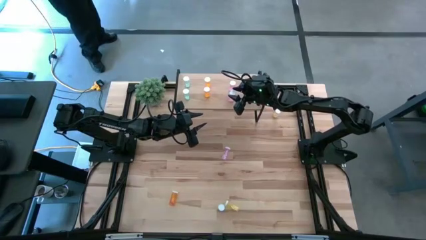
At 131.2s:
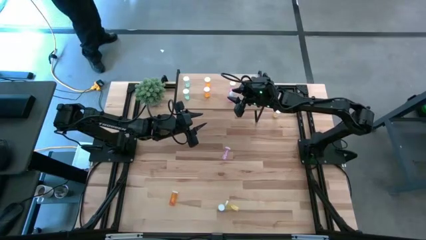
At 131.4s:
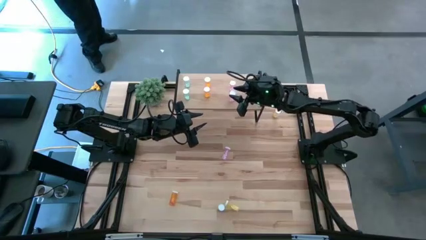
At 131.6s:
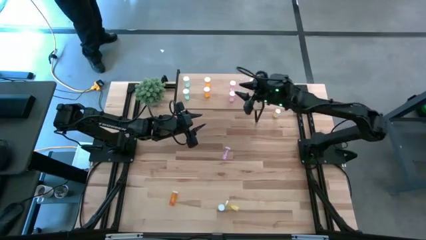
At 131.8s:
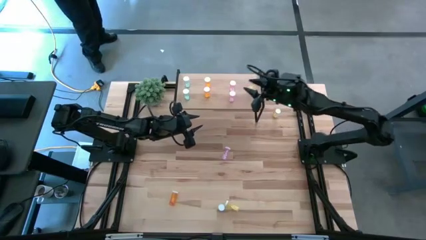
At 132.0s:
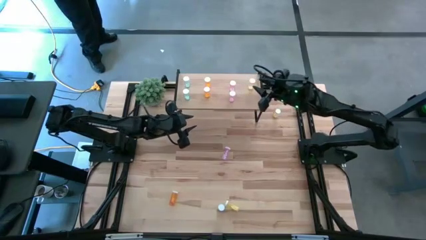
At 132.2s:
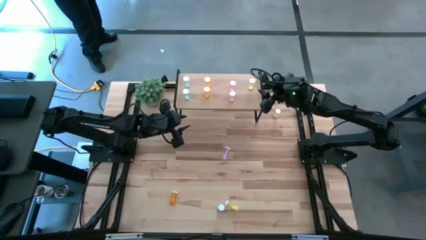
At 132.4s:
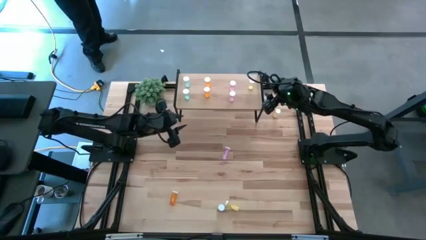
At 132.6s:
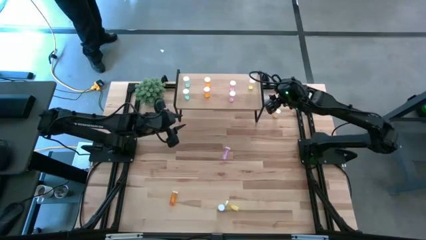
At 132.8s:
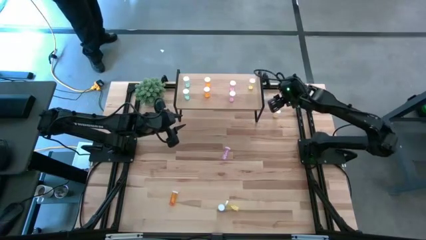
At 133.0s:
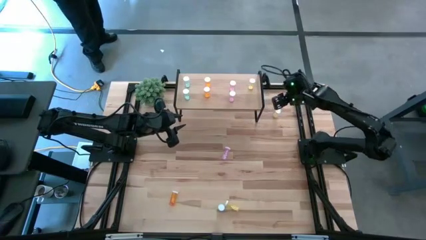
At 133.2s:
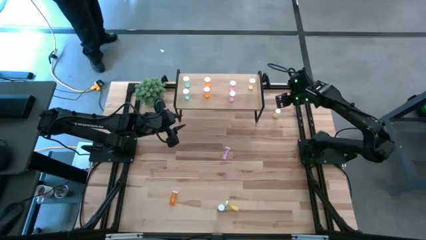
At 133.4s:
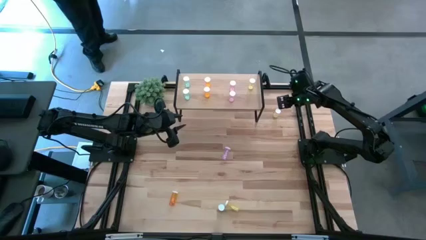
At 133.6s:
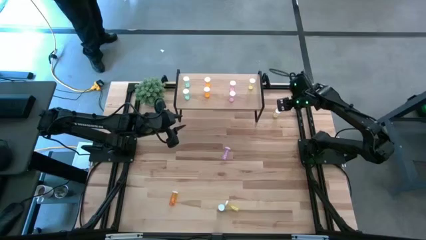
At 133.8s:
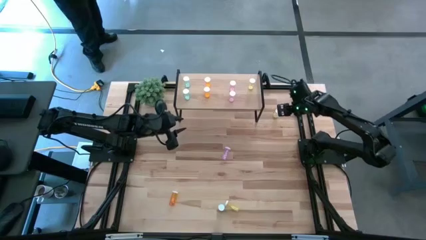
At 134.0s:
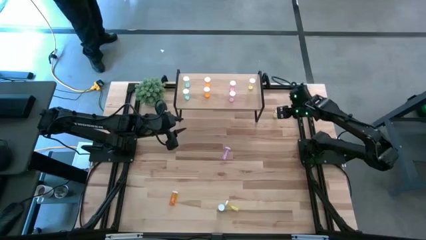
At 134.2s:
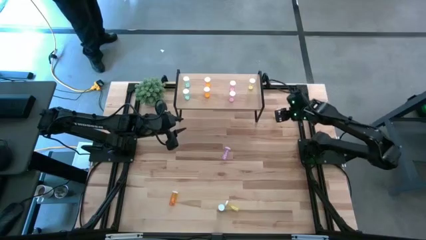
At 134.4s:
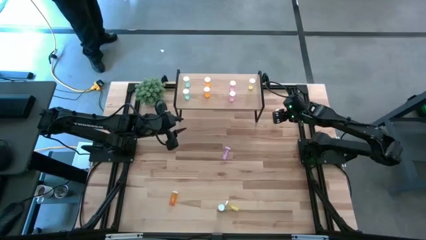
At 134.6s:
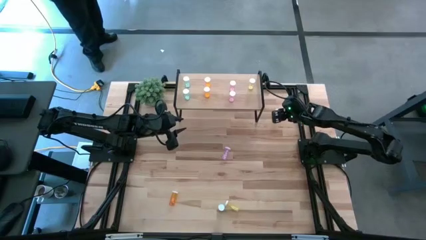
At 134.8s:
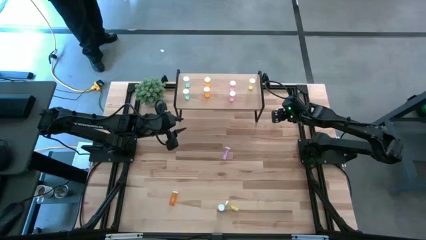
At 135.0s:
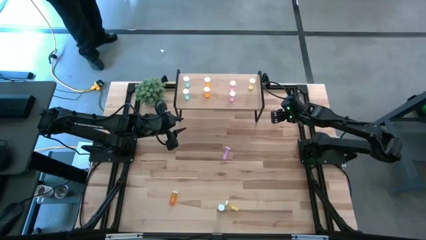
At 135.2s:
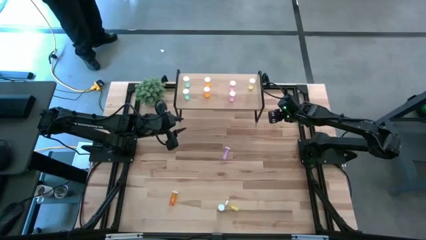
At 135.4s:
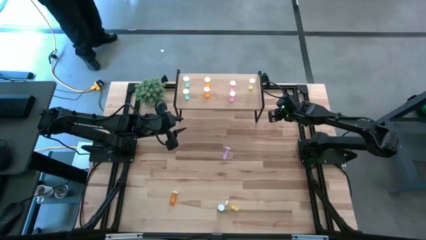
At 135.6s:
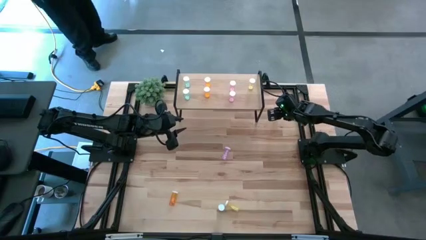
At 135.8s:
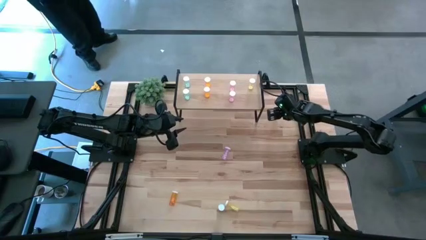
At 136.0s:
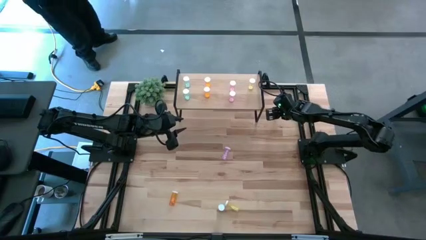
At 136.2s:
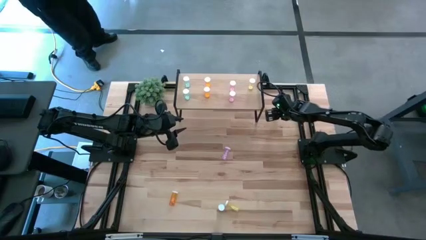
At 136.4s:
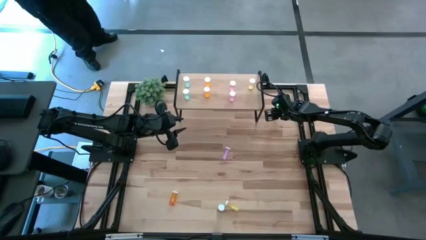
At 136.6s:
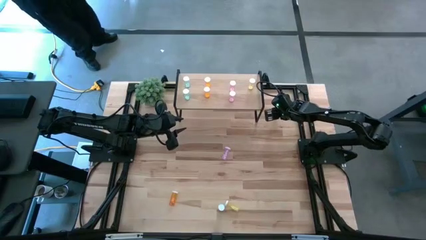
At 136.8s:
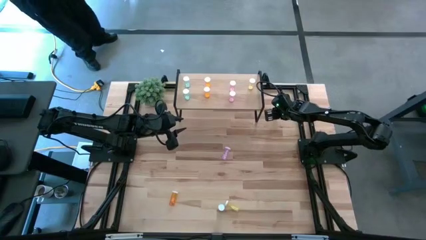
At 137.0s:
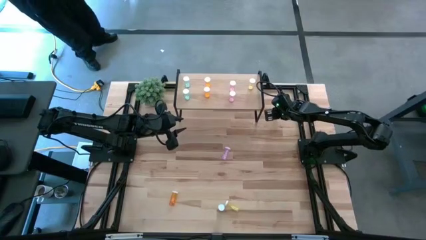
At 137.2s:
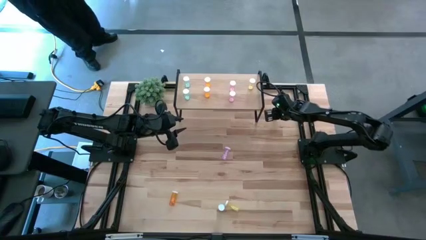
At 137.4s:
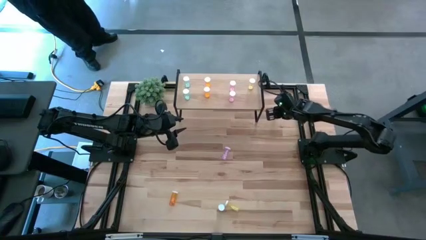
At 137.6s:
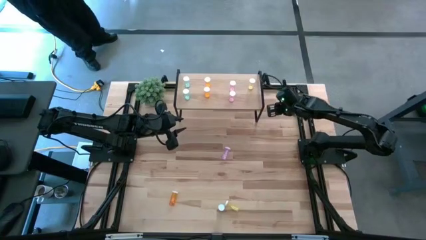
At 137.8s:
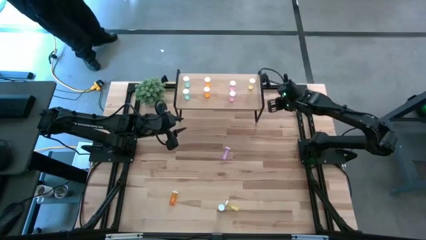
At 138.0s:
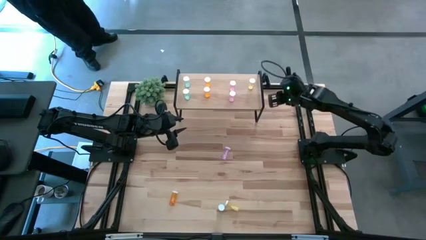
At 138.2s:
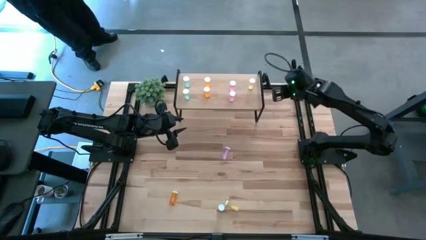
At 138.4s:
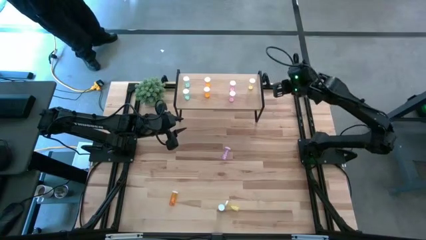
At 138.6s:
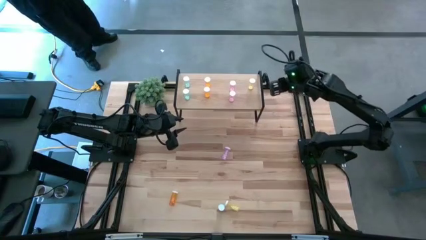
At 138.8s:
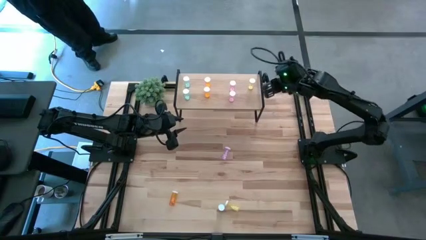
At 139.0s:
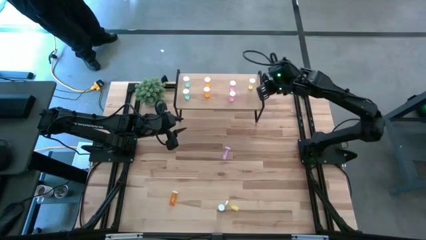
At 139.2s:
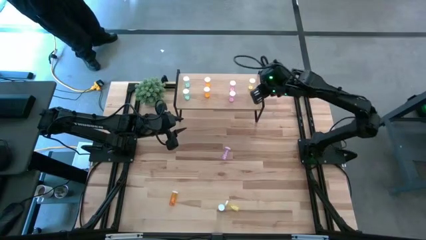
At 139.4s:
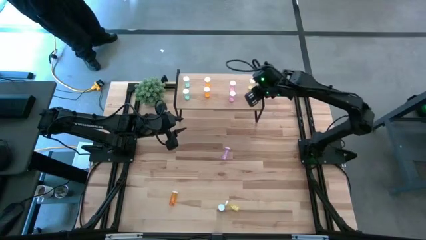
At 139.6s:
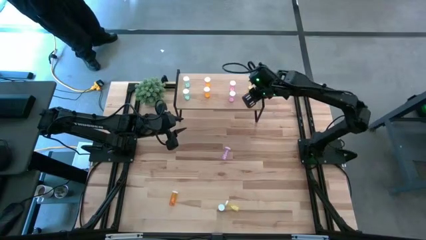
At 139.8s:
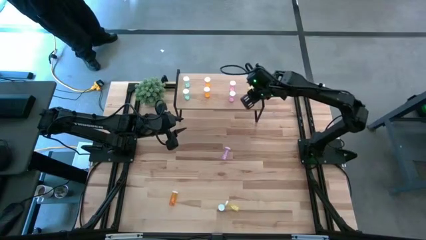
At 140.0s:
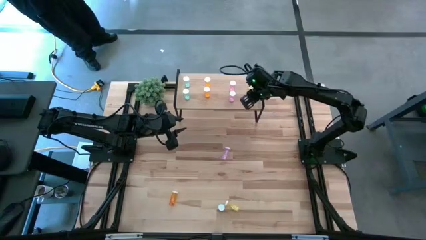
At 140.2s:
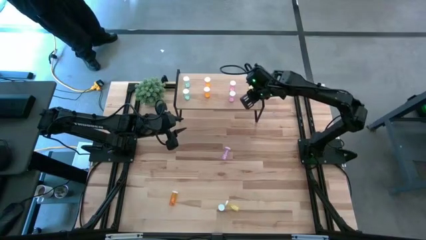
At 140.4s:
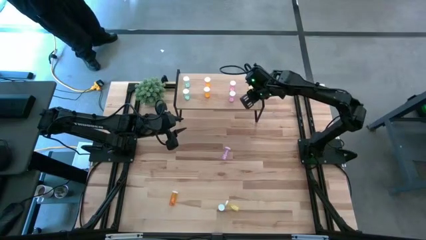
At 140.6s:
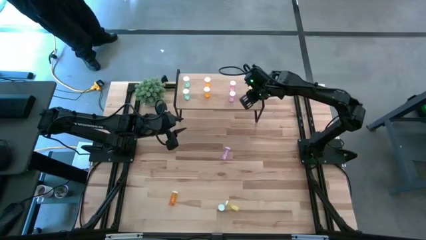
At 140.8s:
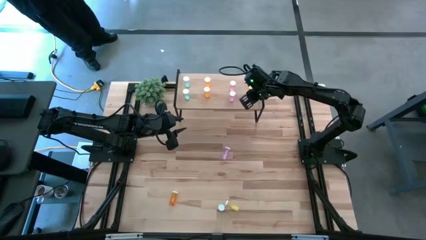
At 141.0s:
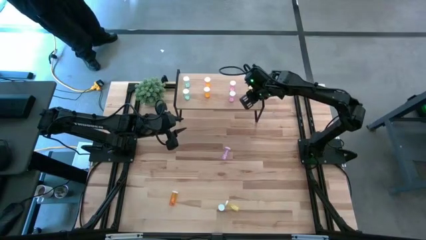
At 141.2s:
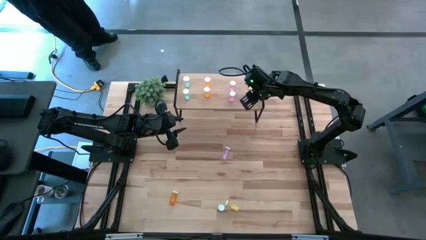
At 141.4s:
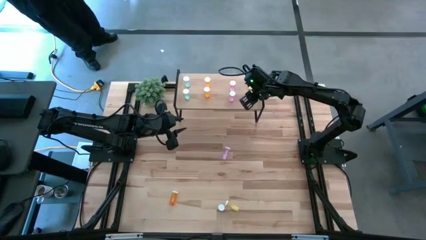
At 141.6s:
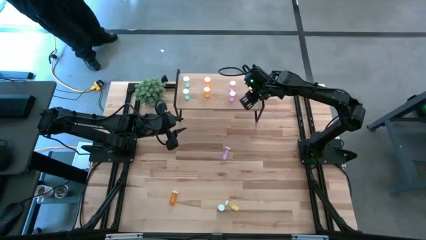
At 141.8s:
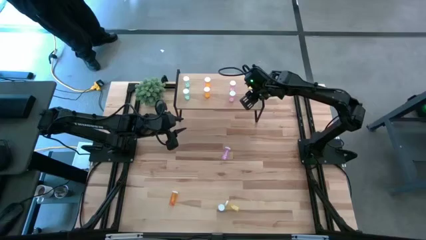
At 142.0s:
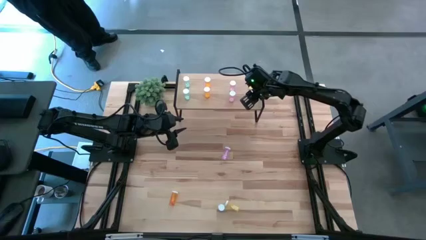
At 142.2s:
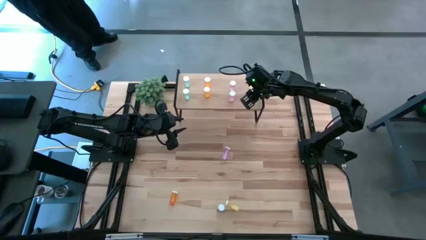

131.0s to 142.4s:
Task: Pick and place medicine bottles onto shelf by color
Put the top yellow pill bottle on the shelf aligned with the yellow pill bottle

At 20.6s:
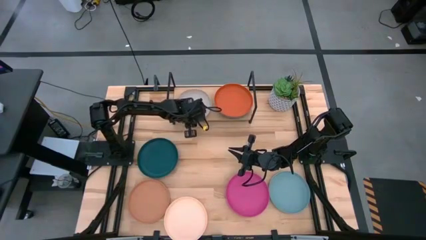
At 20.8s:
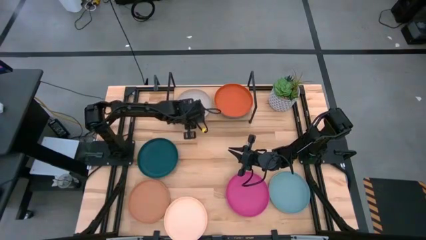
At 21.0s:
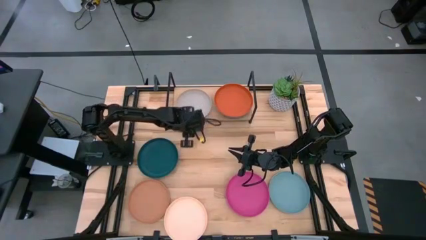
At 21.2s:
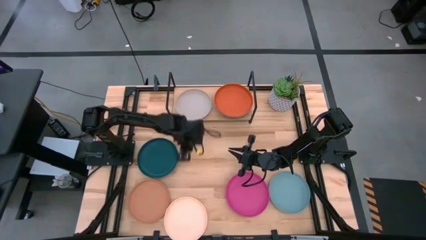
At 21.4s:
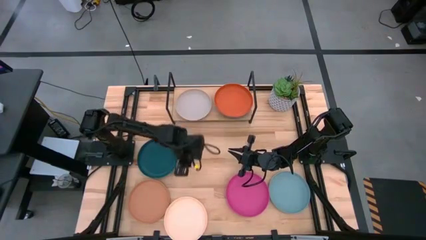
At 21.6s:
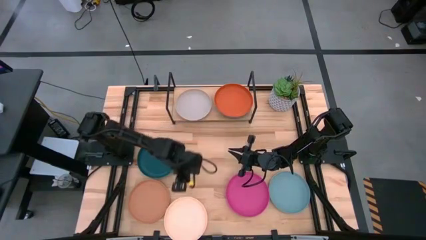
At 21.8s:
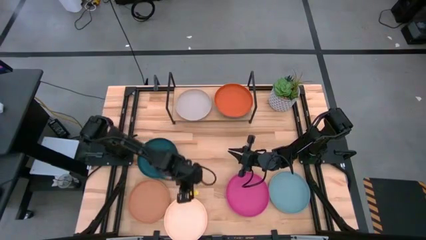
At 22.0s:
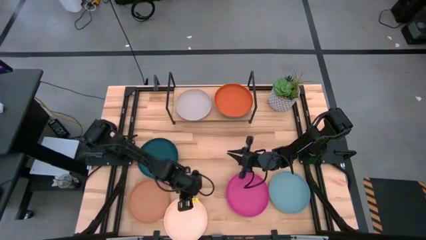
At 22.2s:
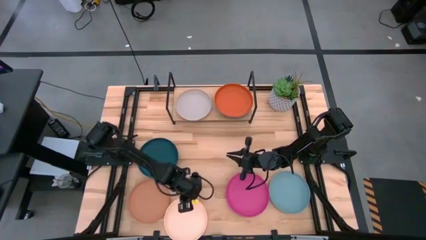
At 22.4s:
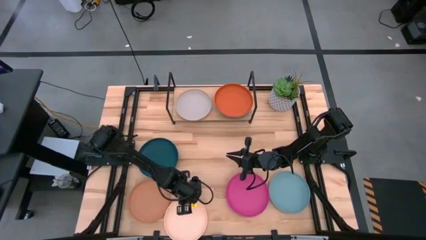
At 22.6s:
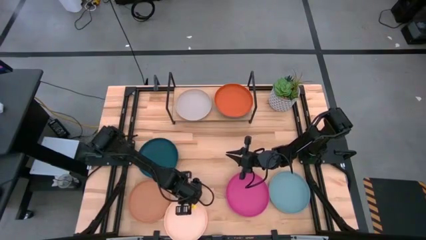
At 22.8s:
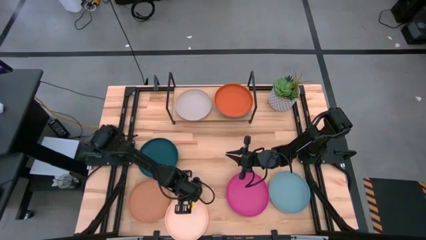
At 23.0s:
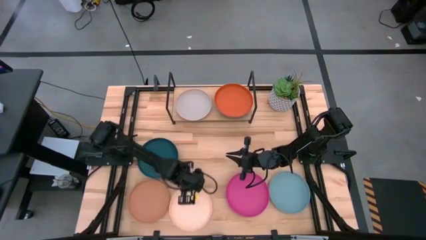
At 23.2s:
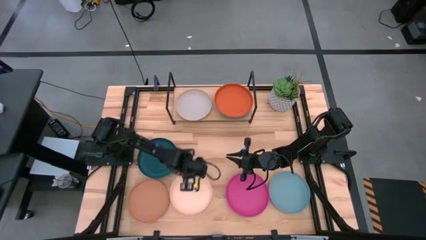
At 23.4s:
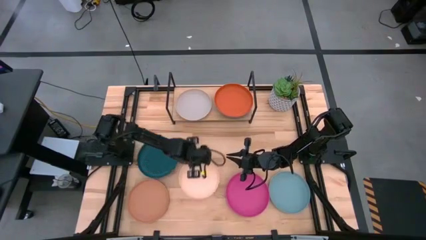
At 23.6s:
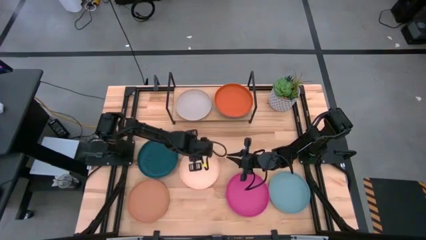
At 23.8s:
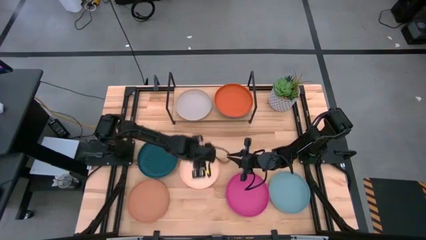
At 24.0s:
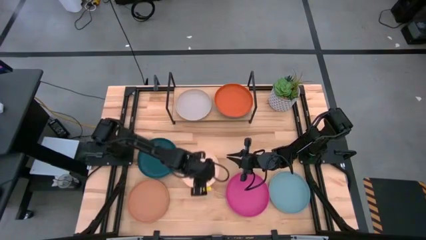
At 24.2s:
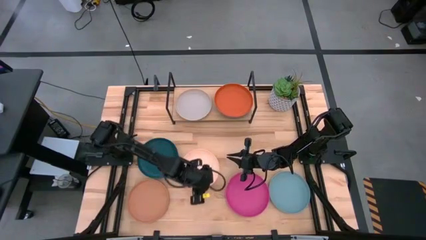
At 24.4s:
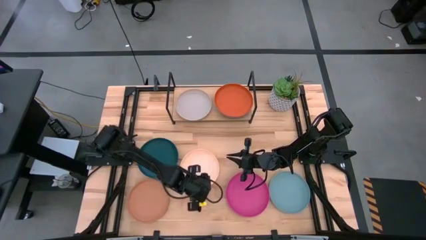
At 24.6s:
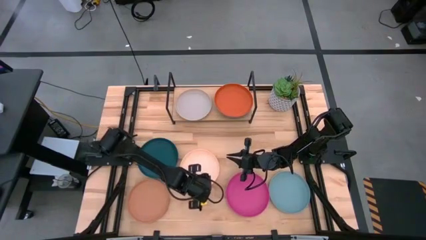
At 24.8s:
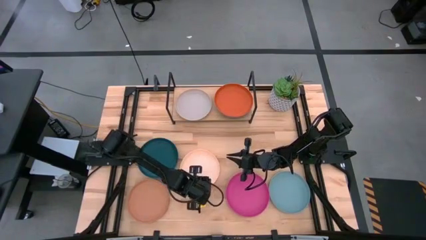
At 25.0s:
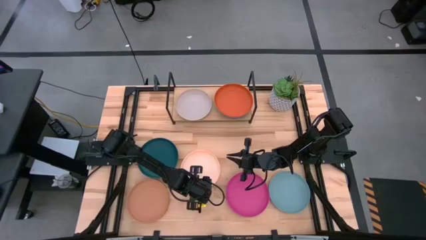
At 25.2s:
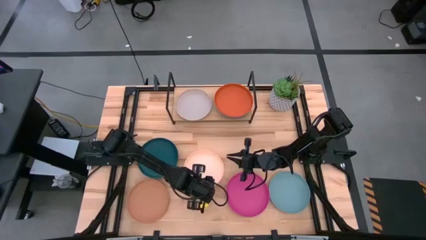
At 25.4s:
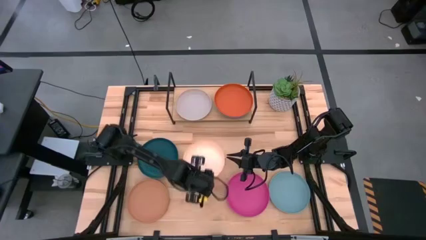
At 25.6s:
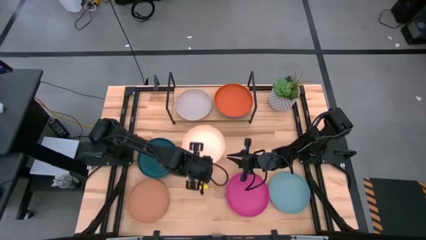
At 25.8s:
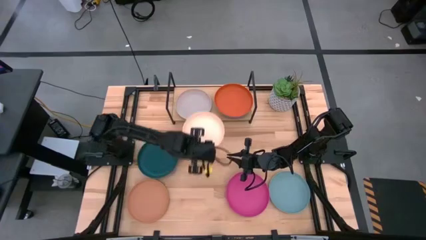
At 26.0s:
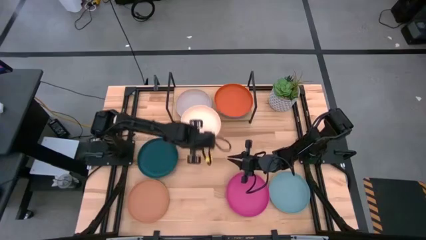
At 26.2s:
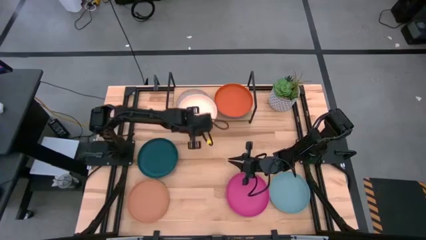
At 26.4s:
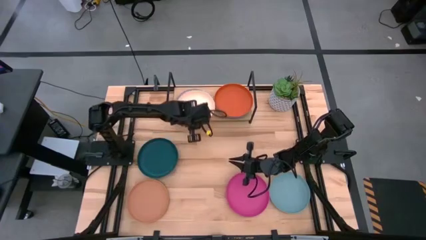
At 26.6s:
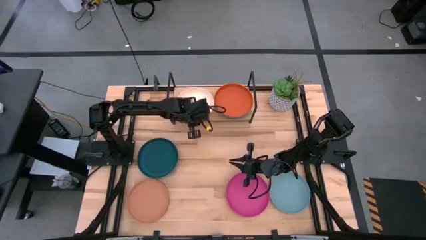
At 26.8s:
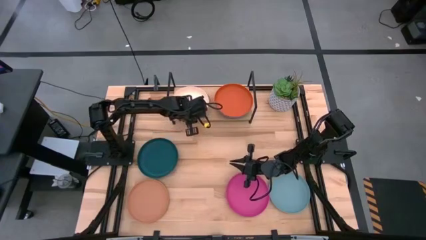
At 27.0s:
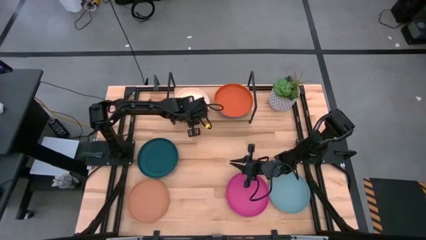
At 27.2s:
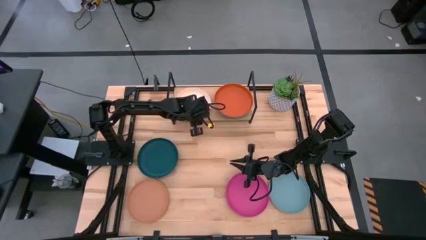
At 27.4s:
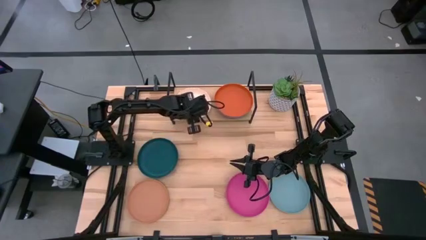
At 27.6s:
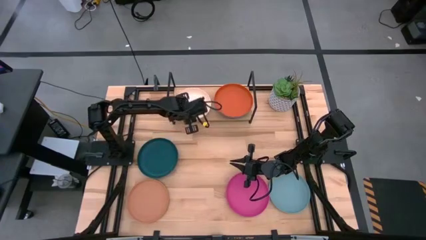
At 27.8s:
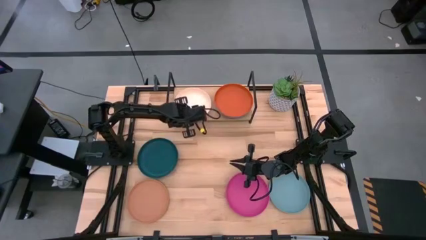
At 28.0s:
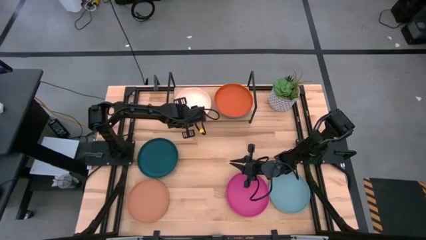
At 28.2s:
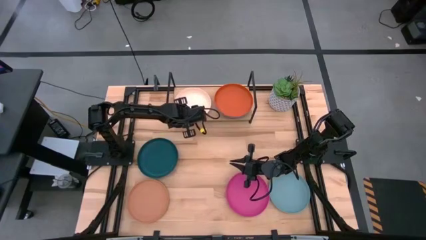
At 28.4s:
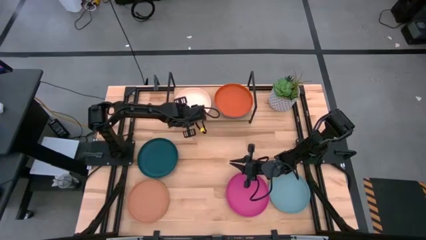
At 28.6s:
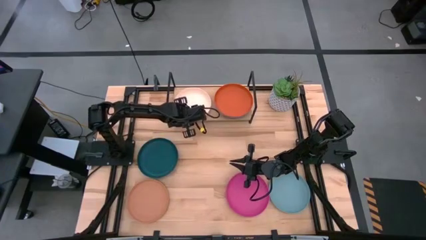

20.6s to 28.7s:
Task: Place and stack plates onto a shelf
Stack the light orange plate on top of the the gray plate on the shelf
